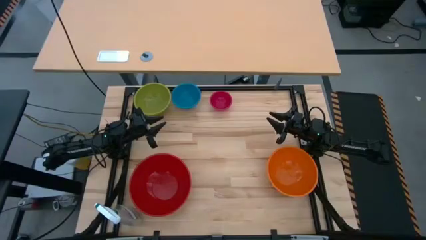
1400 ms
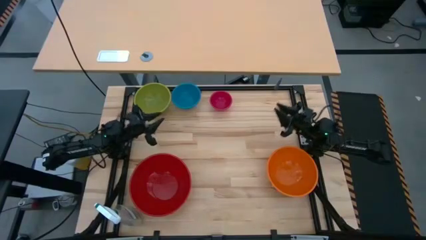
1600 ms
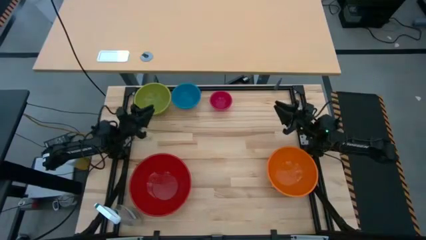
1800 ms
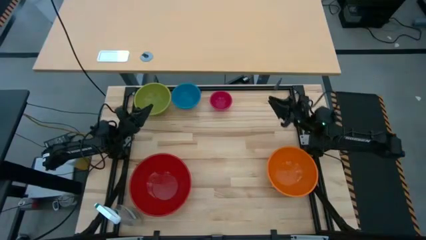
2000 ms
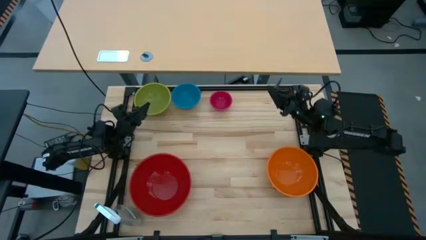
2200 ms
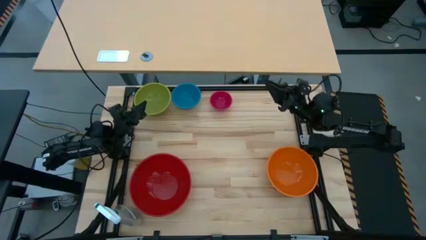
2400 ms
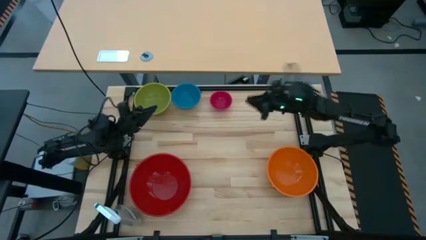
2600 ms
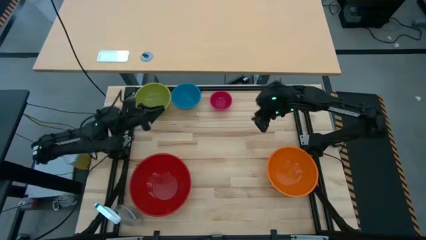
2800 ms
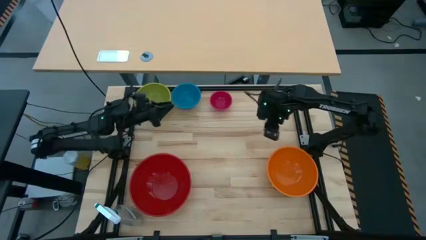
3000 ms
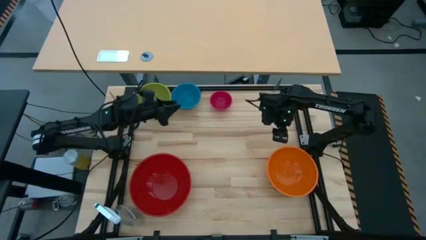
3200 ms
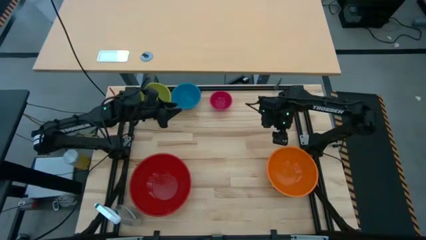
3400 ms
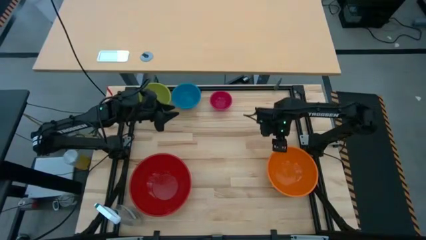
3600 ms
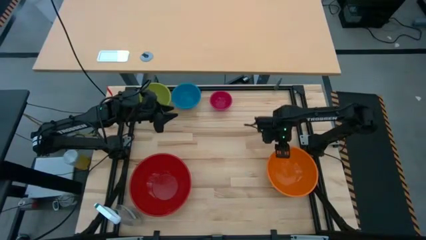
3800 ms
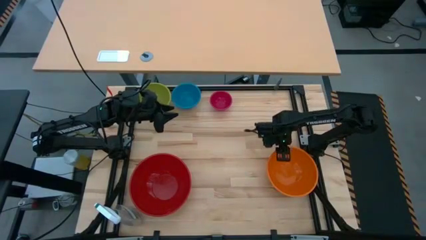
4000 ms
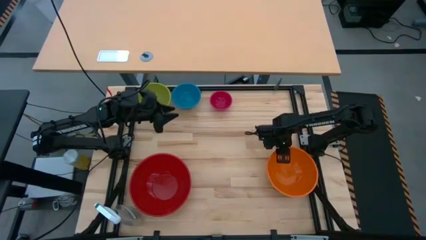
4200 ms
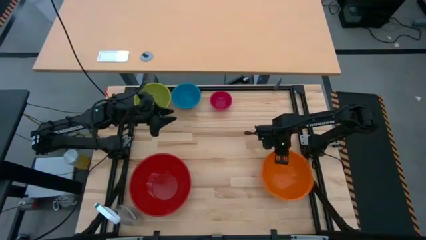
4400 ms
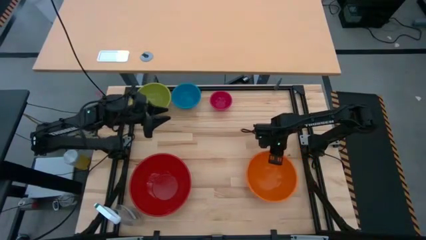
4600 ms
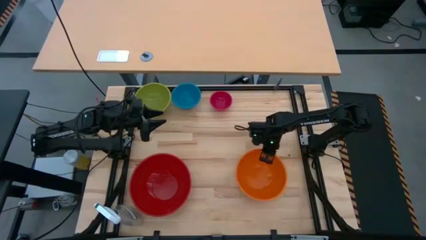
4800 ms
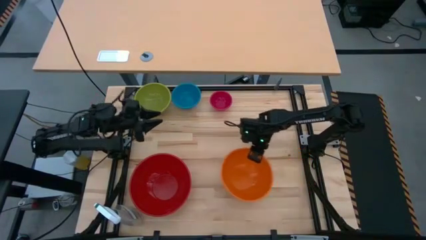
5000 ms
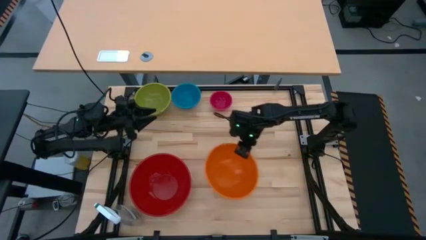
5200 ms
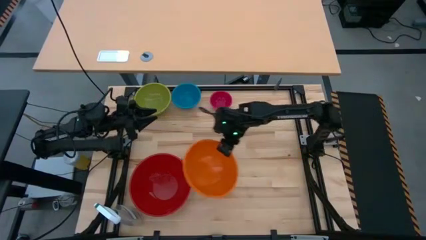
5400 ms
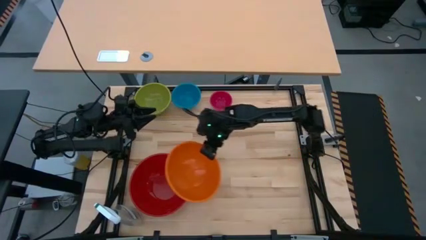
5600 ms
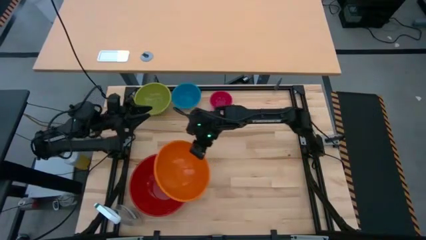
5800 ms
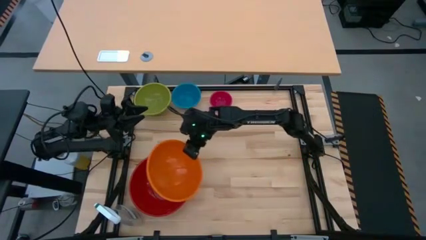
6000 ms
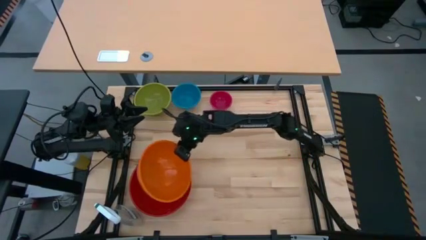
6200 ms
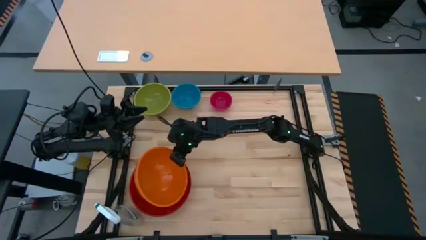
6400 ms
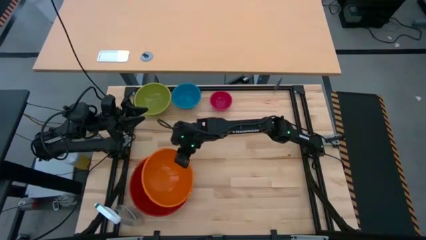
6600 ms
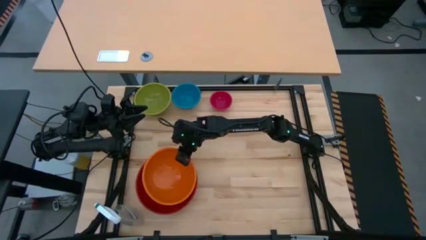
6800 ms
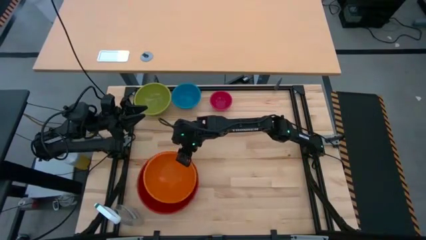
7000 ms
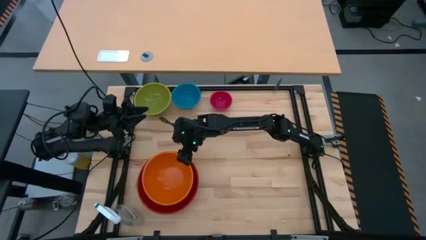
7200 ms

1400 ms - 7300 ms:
Stack the orange bowl on top of the red bowl

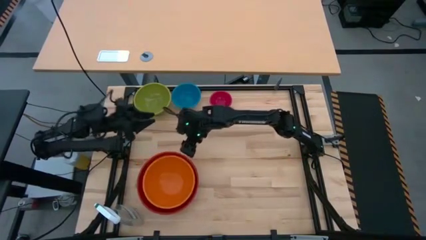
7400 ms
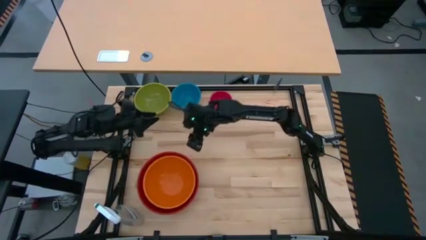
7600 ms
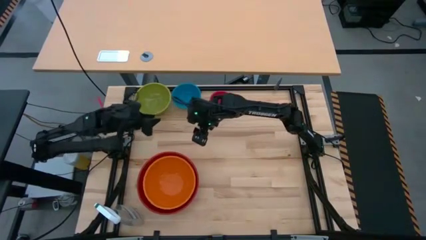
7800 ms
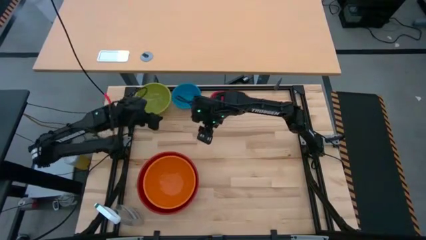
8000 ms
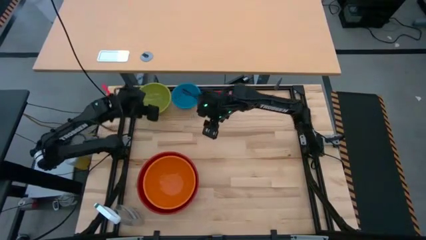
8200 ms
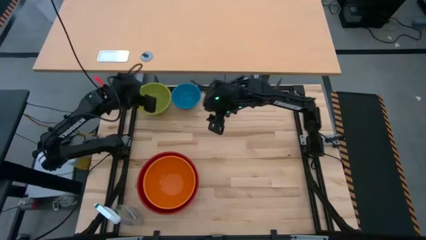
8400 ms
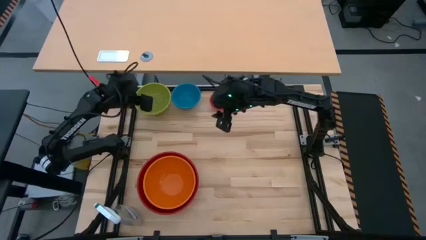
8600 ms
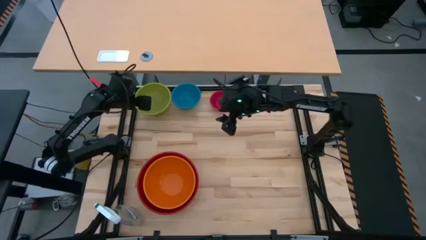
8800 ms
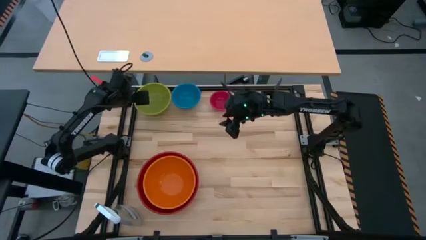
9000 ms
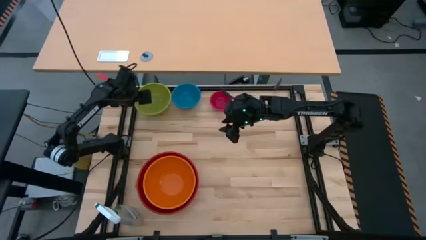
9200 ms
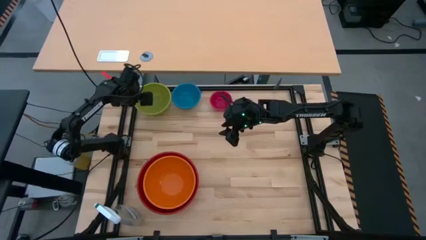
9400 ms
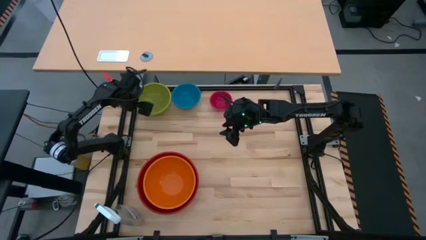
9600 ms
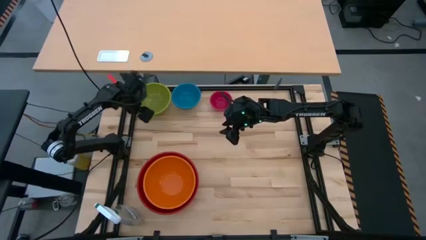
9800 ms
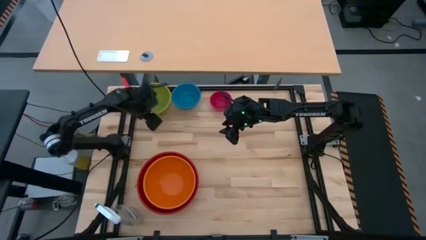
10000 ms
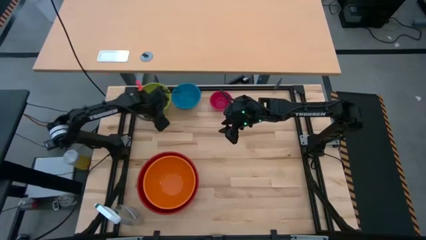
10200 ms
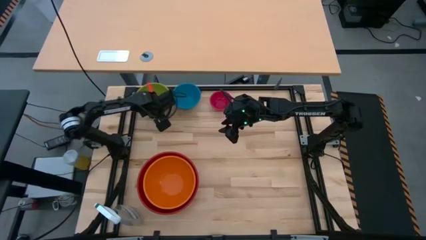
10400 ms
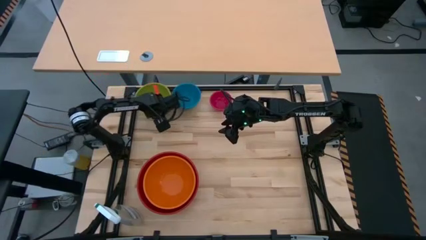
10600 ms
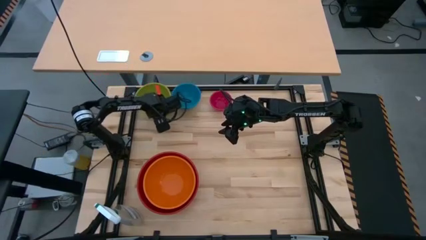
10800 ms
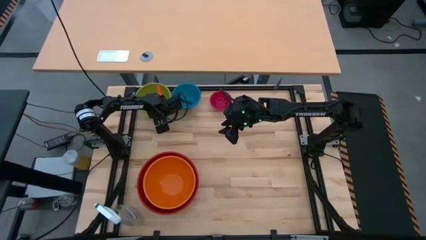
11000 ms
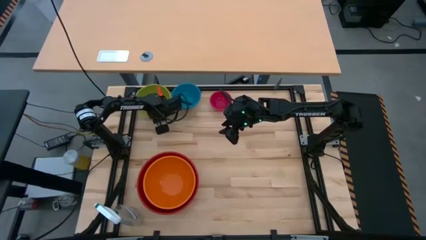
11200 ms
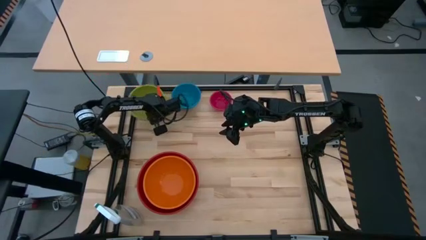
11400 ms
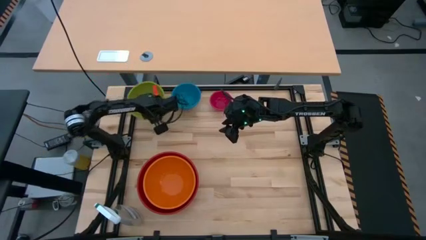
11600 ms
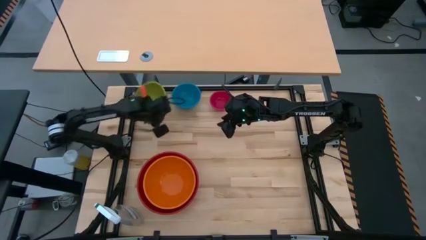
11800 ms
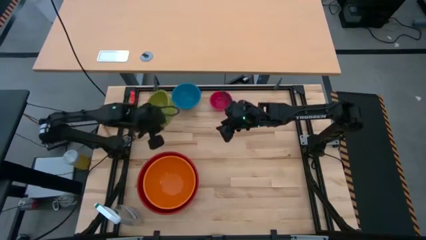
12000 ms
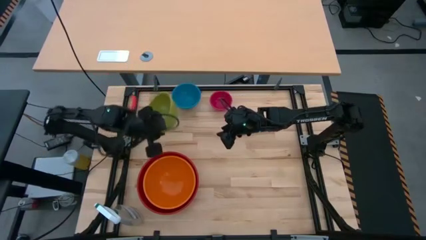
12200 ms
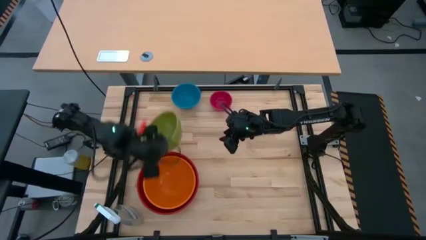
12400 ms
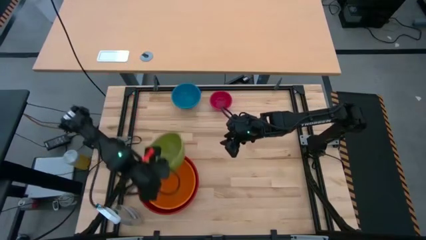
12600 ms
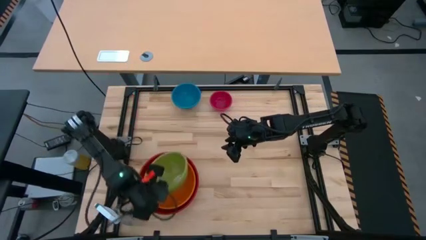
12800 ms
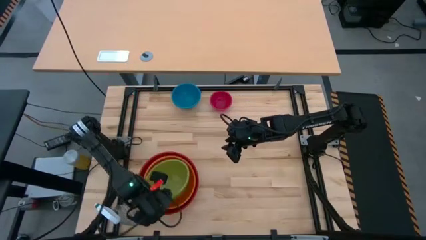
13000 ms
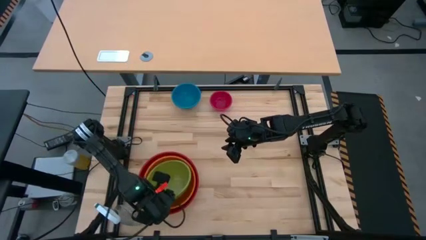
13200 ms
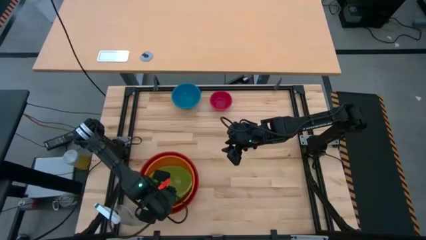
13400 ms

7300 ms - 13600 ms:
Stack the green bowl on top of the orange bowl

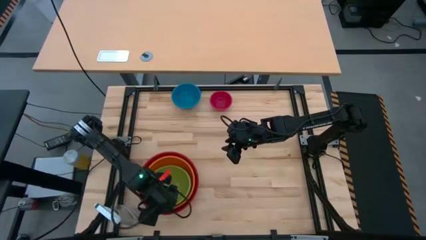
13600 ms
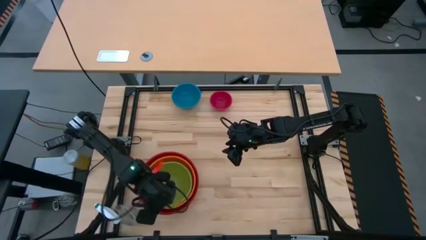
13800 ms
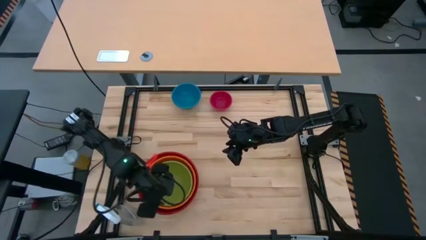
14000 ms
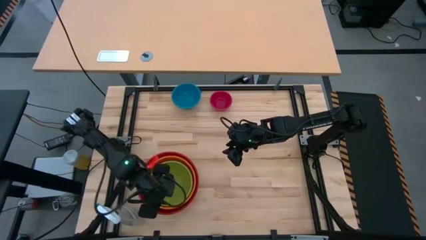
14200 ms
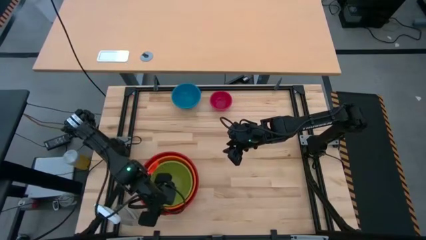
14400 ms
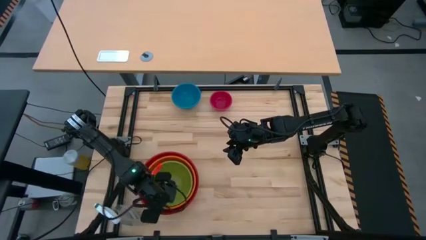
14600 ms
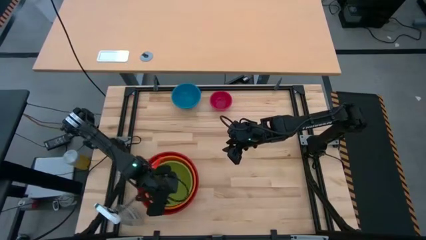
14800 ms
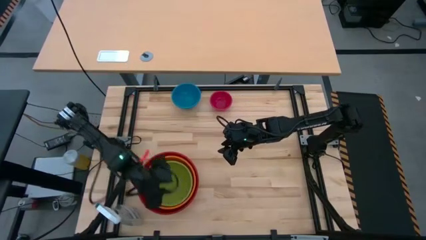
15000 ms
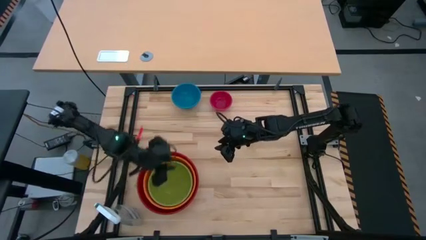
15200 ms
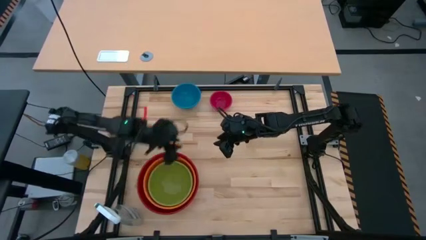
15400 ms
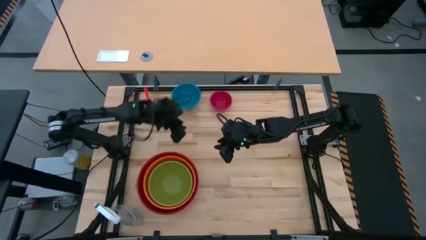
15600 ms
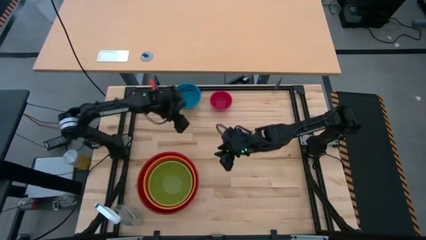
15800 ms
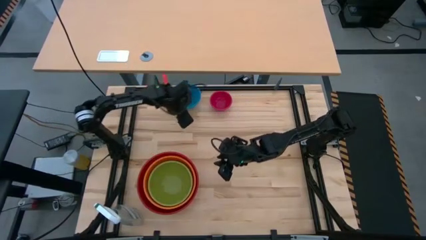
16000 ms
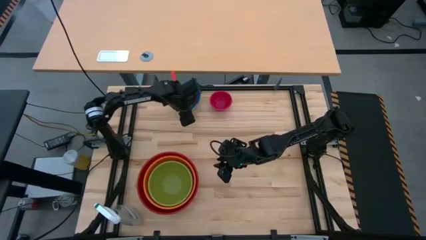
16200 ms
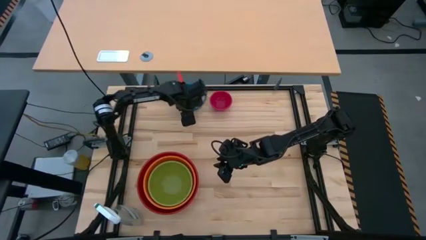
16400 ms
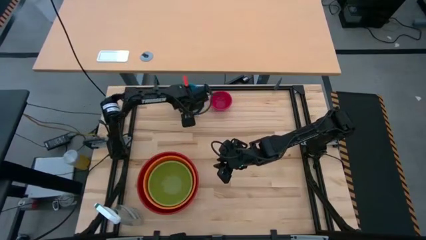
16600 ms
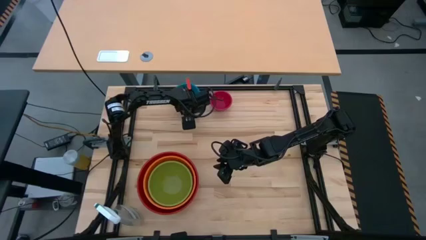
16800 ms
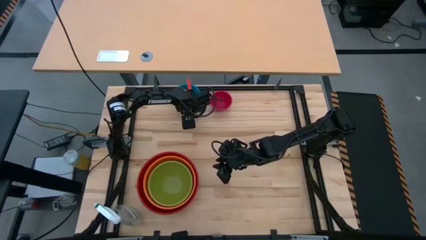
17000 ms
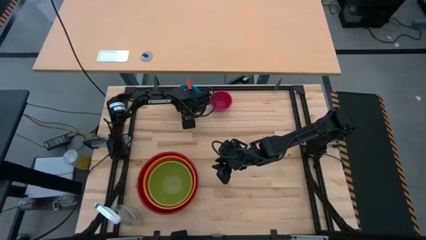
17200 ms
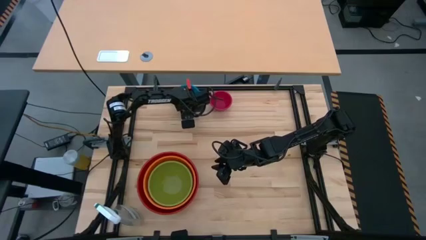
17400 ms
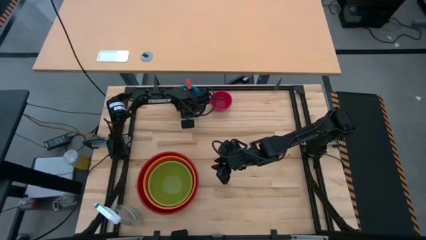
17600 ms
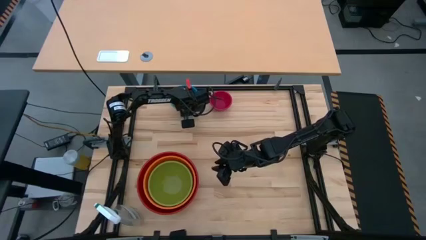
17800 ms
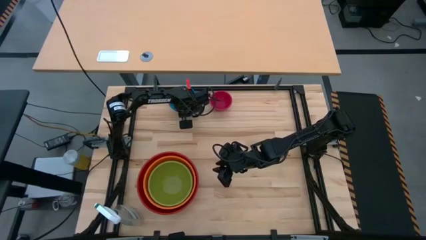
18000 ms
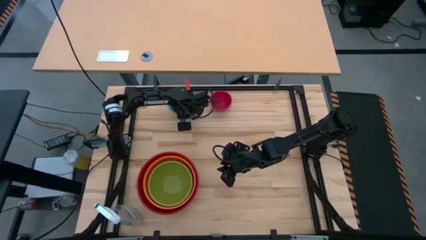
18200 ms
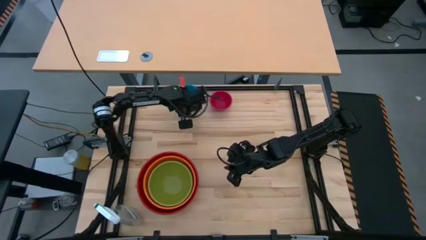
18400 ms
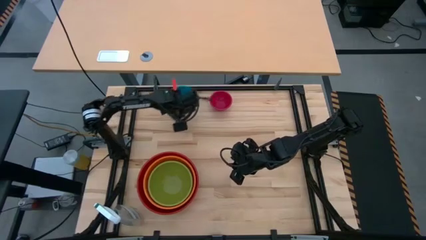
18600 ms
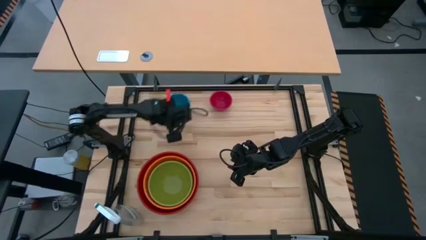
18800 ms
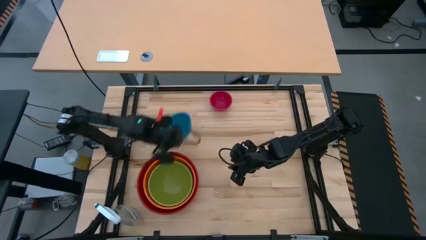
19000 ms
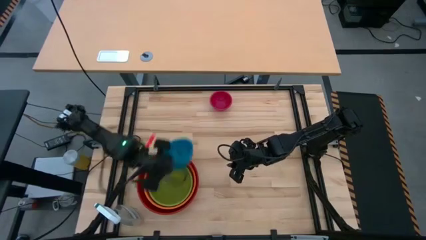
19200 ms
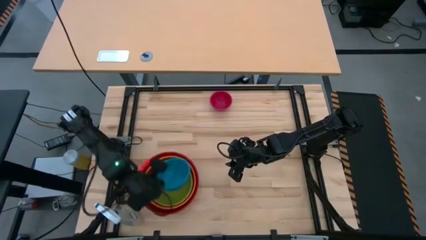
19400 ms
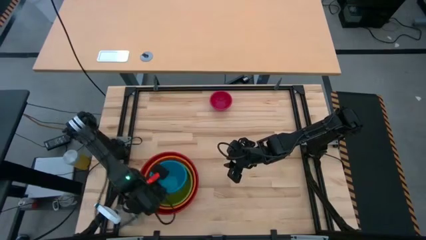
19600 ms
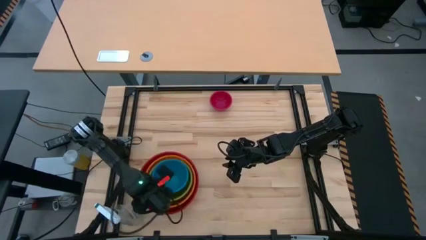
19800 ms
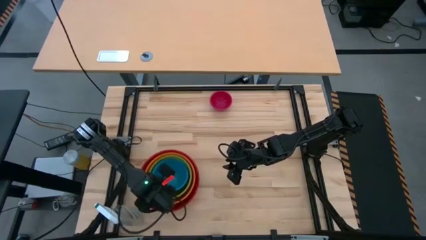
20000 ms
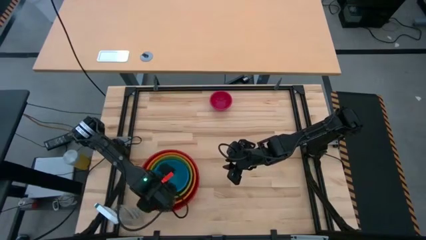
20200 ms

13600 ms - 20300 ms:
Stack the blue bowl on top of the green bowl
